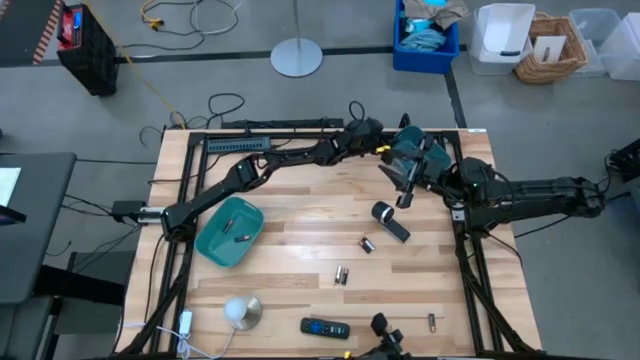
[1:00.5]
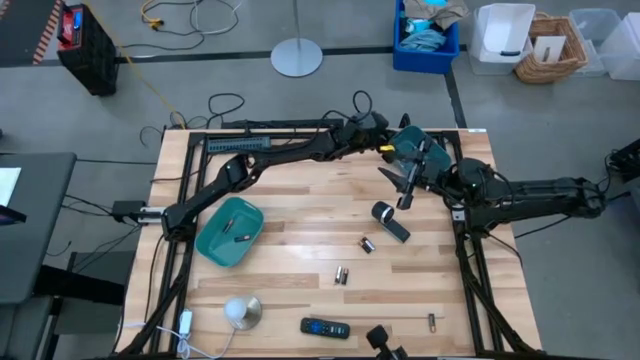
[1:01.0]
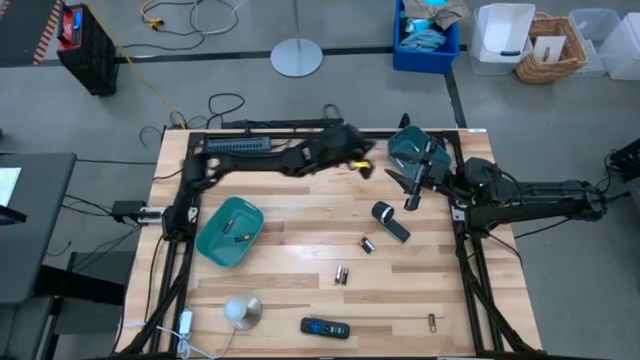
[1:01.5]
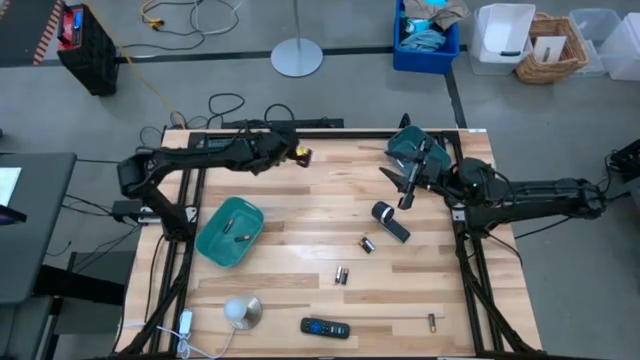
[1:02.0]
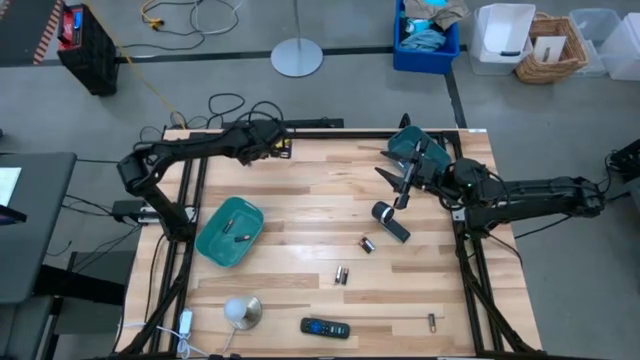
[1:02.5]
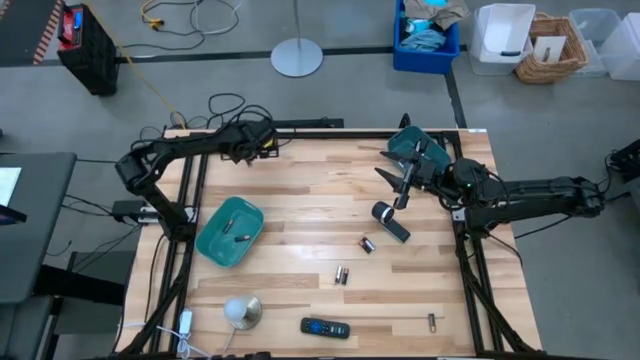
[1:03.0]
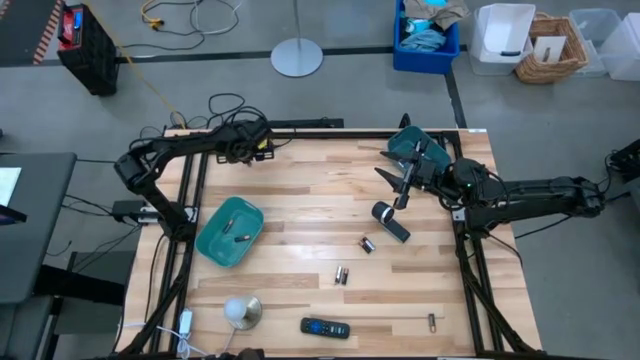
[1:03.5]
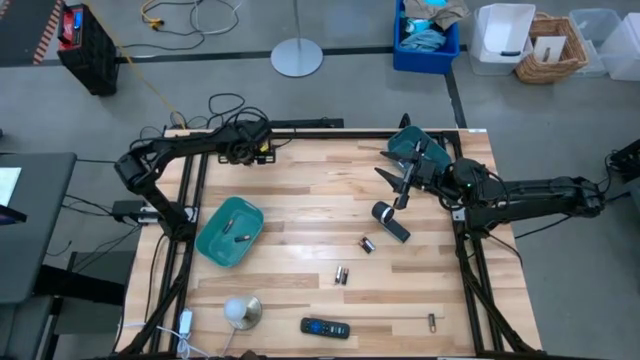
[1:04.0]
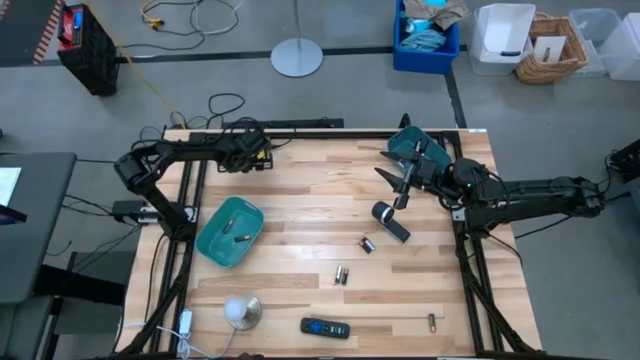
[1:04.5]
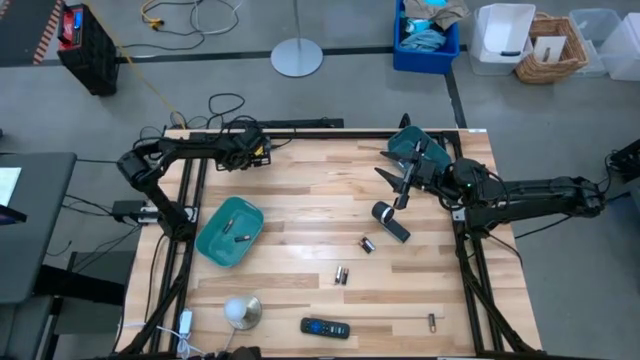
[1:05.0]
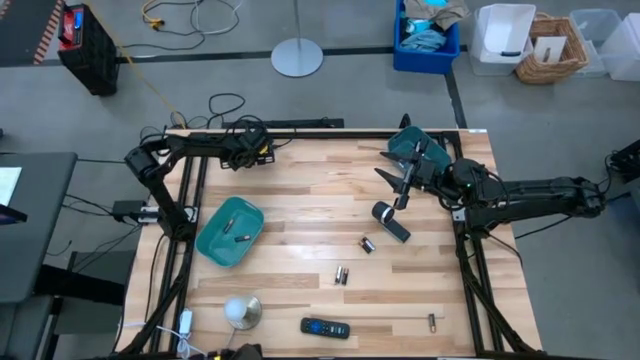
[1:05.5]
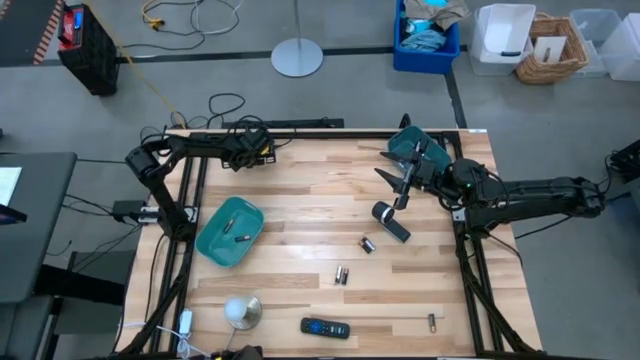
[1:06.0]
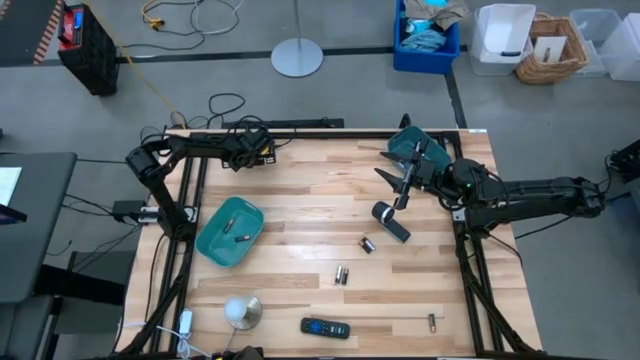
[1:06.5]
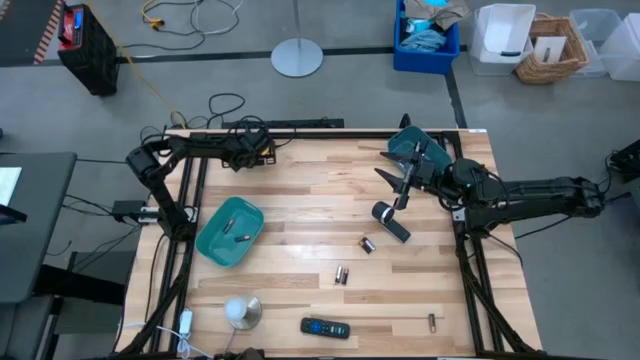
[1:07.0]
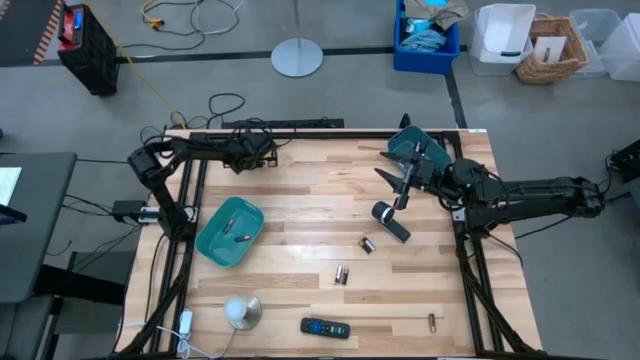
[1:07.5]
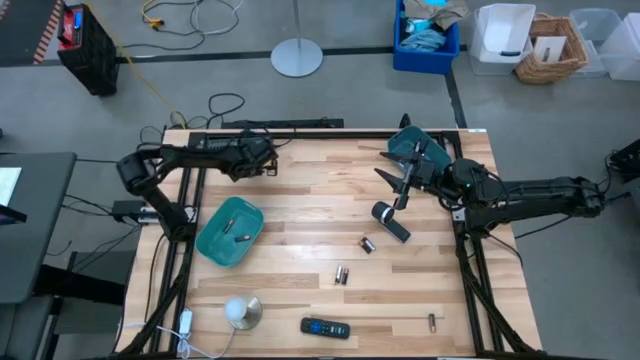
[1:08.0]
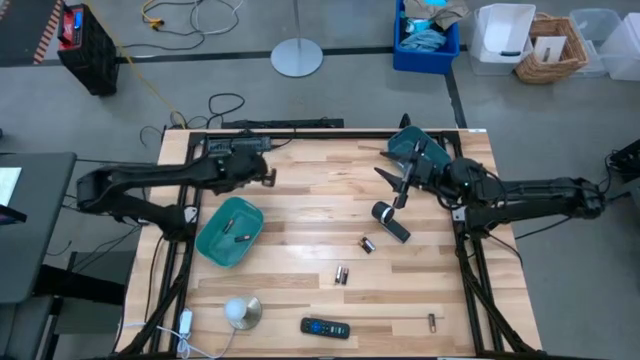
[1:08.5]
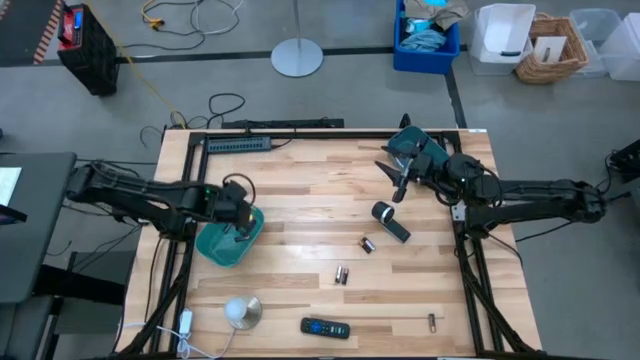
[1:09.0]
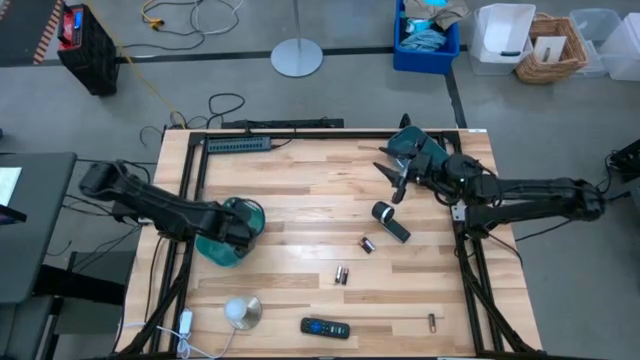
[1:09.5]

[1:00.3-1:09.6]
Task: Sort batteries
Put the black battery into the green bin

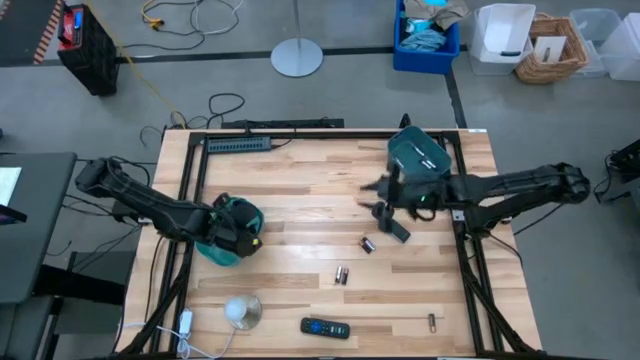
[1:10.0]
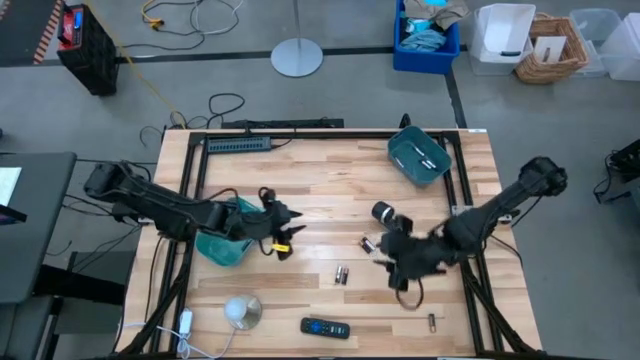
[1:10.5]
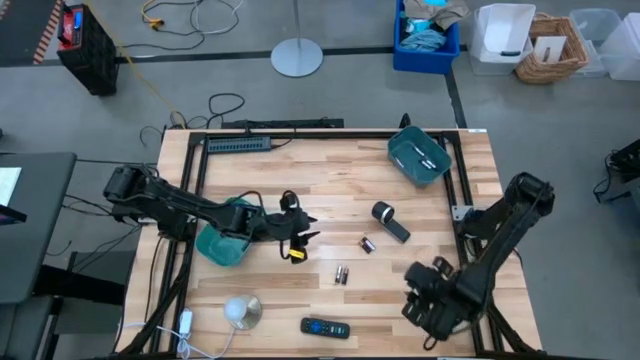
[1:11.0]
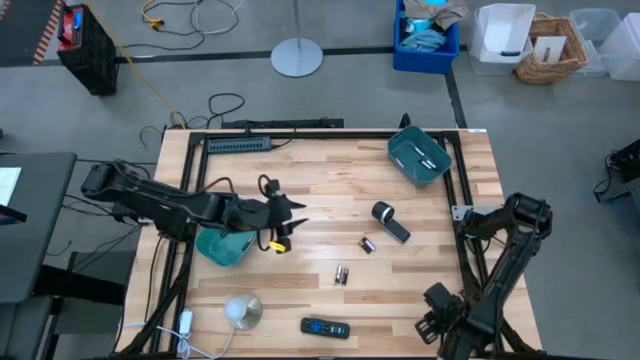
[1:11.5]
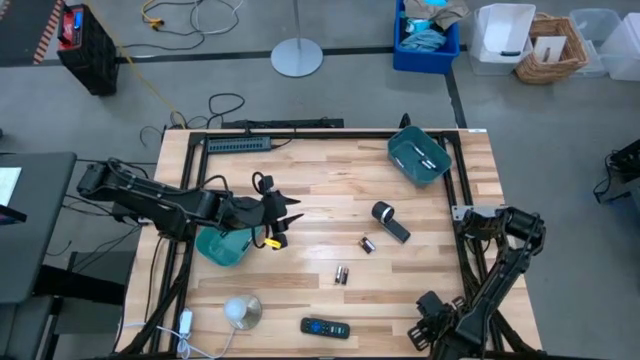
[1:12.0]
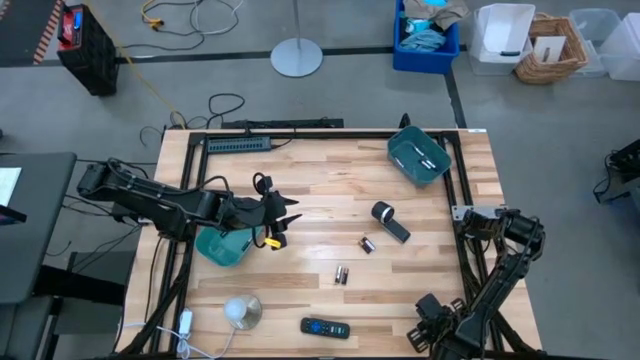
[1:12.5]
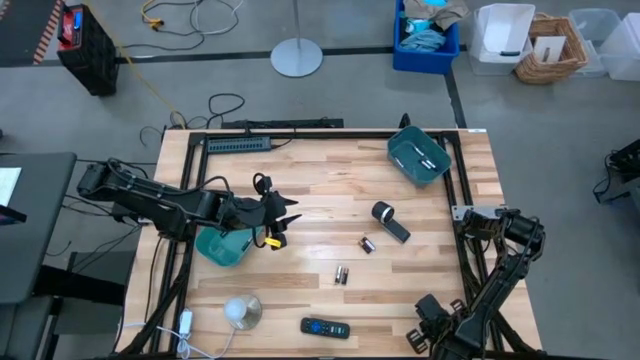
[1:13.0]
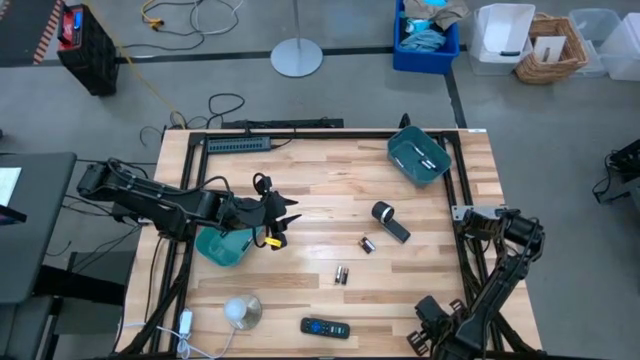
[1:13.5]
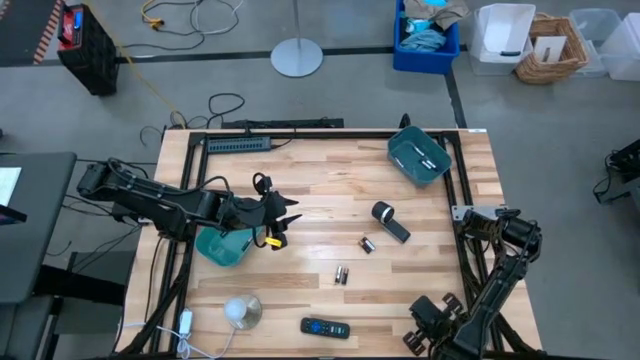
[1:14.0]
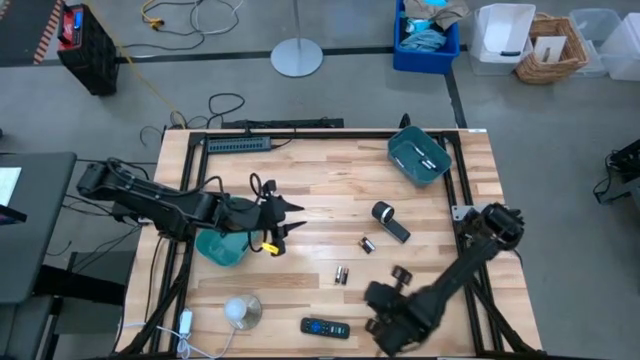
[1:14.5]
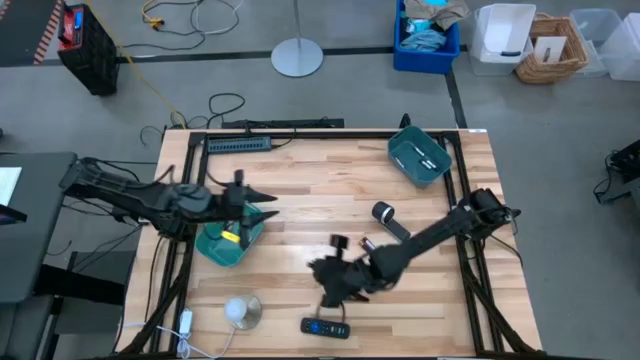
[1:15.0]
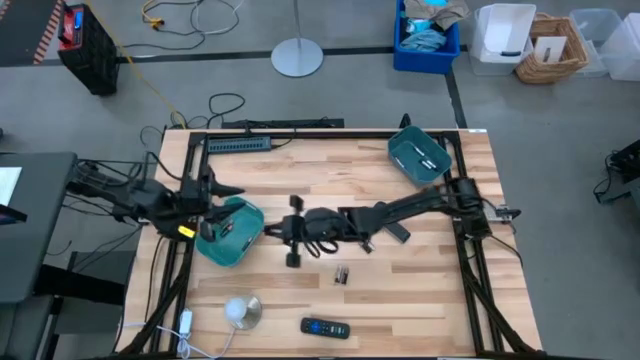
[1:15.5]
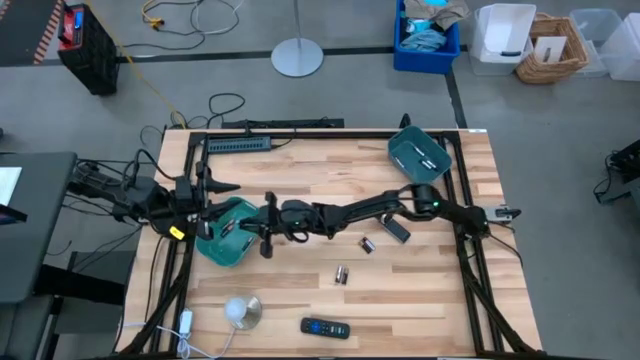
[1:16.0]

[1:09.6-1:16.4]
Put the black battery into the green bin

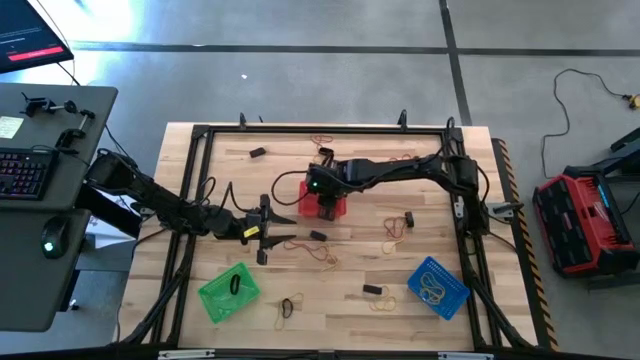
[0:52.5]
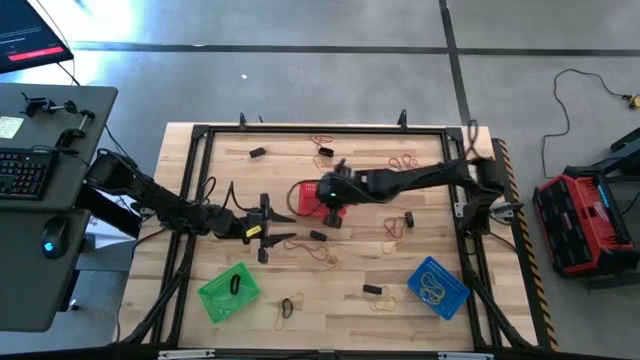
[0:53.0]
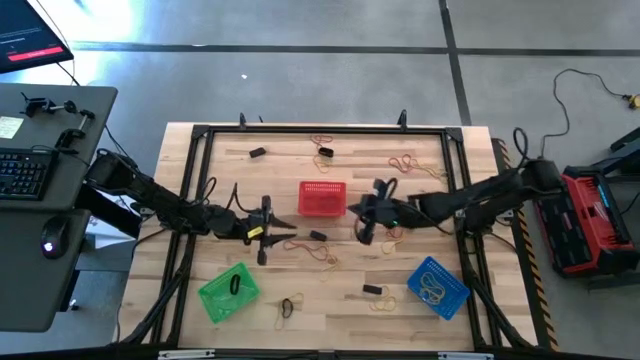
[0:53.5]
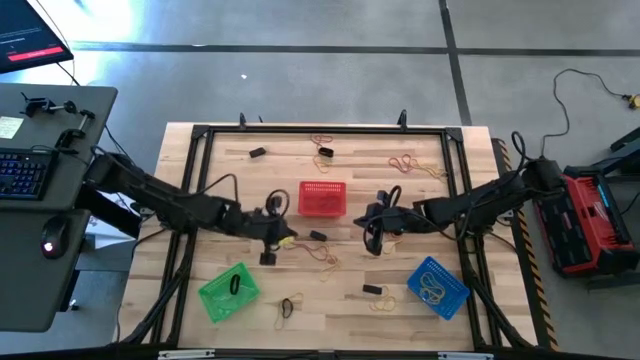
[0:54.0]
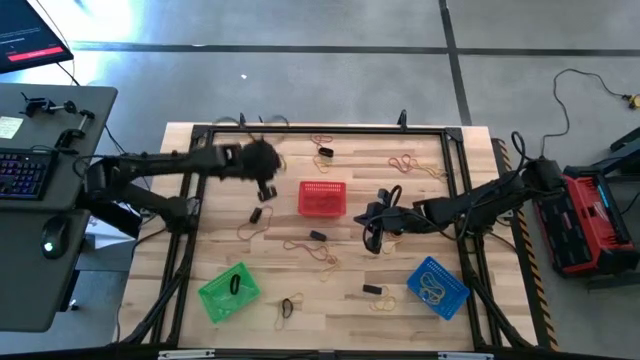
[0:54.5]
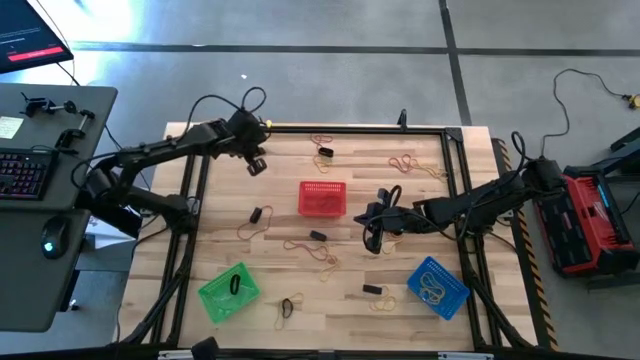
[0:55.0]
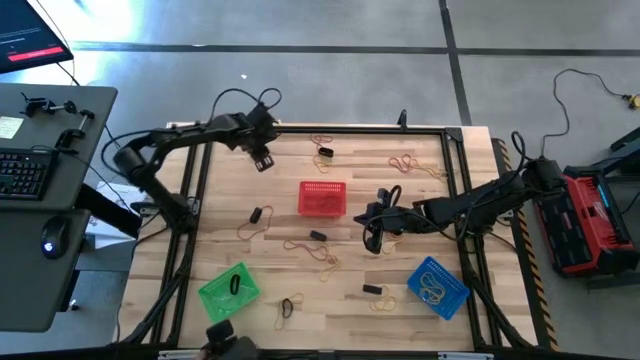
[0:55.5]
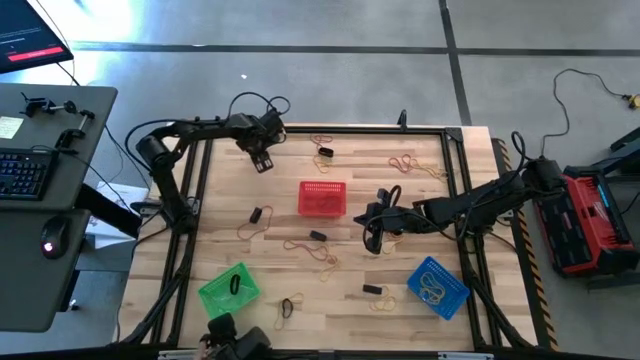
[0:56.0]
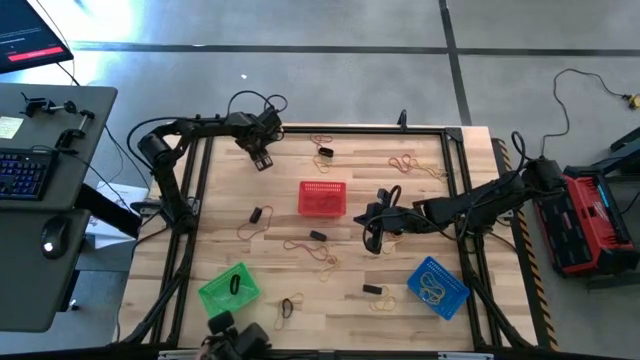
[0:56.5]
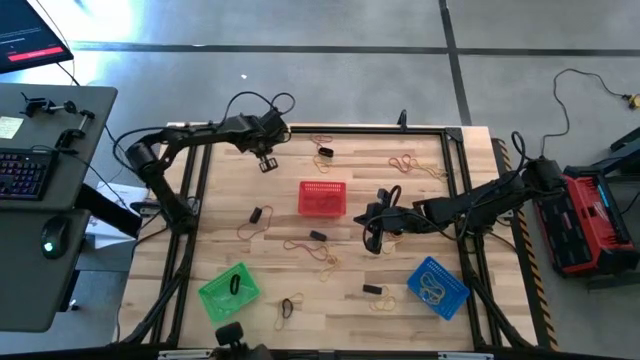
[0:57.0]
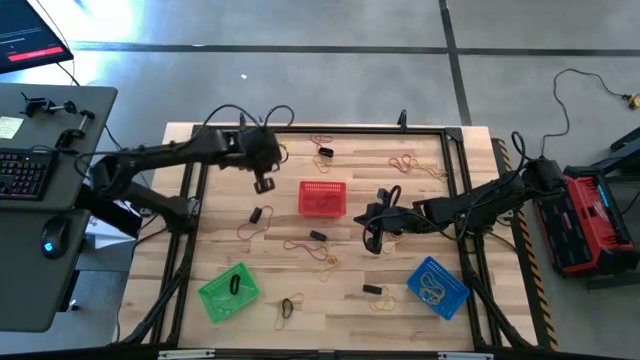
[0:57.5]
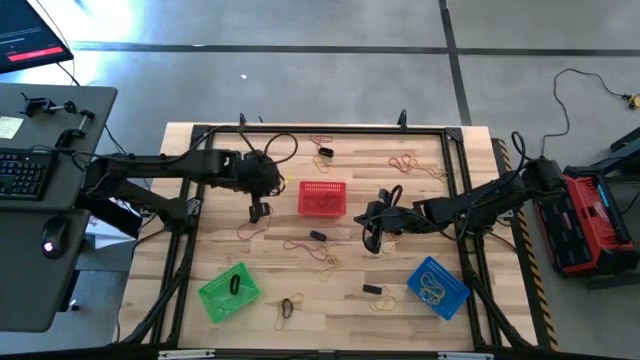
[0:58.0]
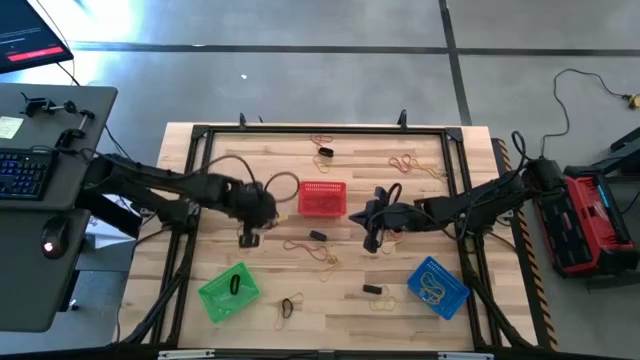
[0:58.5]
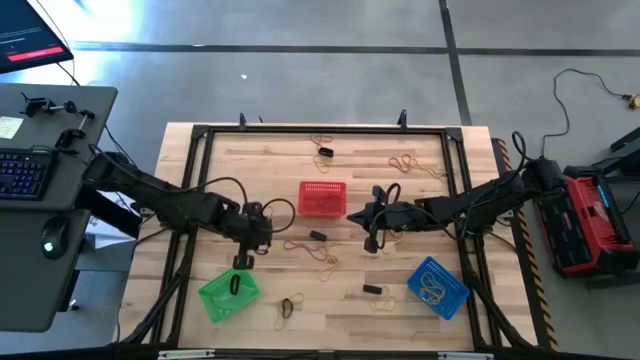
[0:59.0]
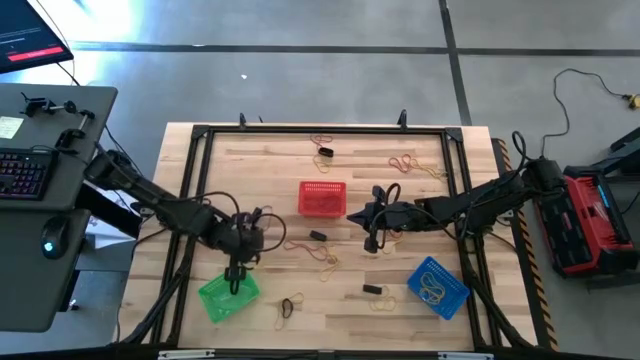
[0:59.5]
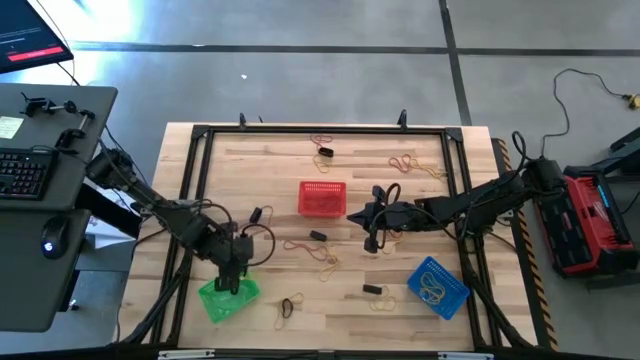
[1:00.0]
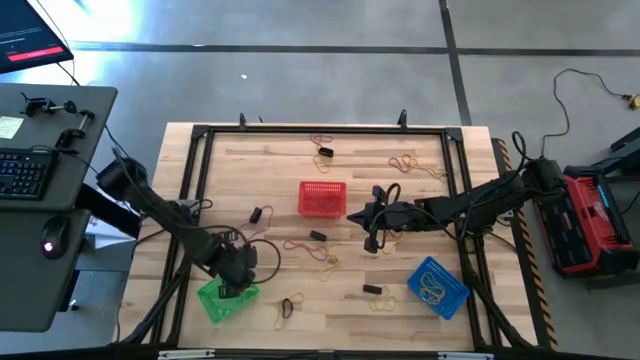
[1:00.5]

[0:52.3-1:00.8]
Task: Sort rubber bands into baskets
Put the black rubber band into the green bin
